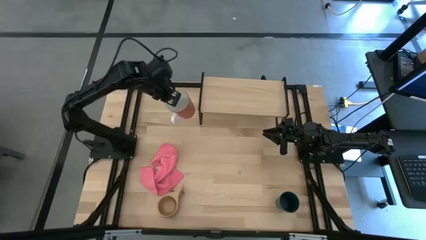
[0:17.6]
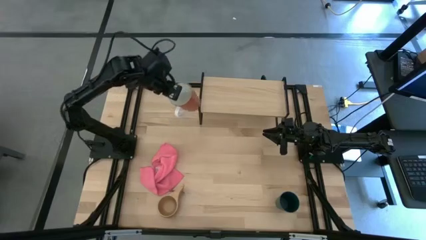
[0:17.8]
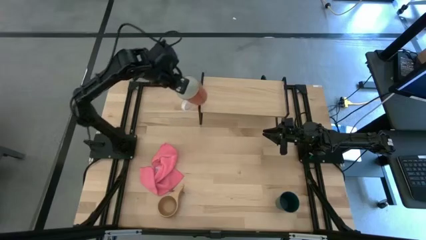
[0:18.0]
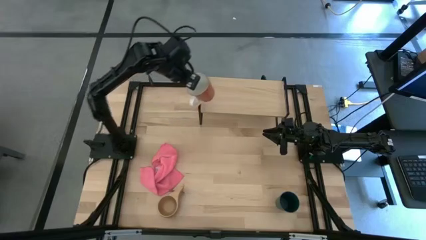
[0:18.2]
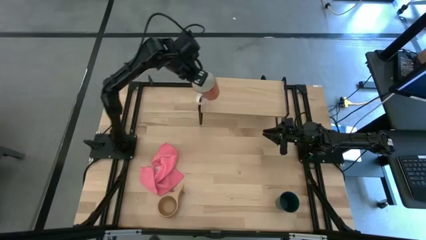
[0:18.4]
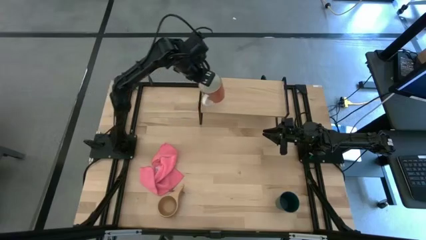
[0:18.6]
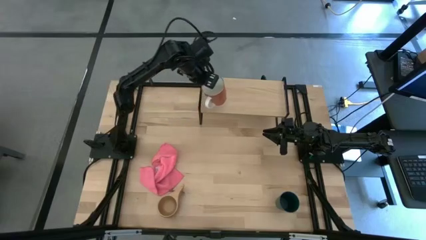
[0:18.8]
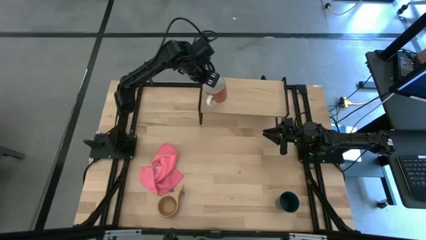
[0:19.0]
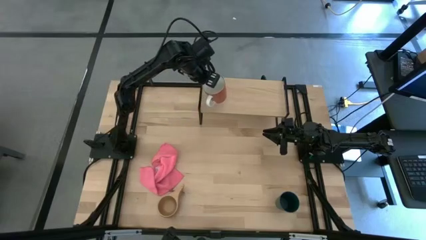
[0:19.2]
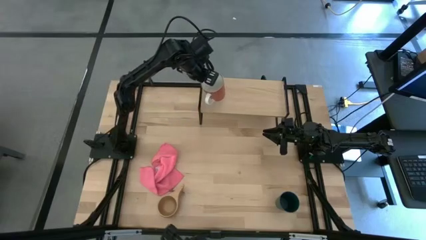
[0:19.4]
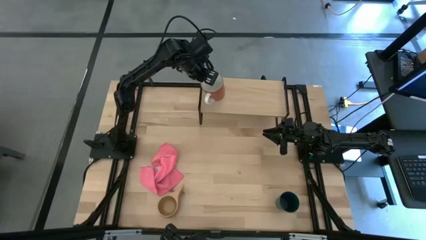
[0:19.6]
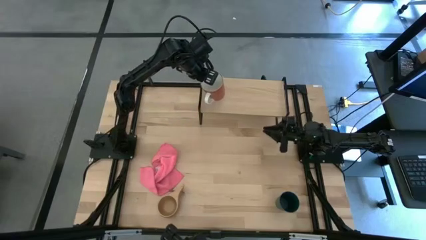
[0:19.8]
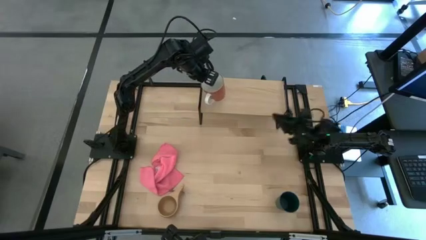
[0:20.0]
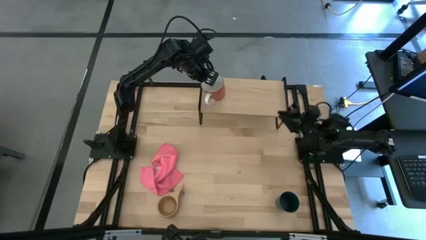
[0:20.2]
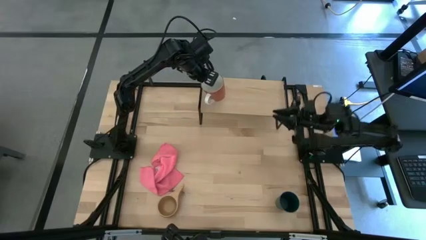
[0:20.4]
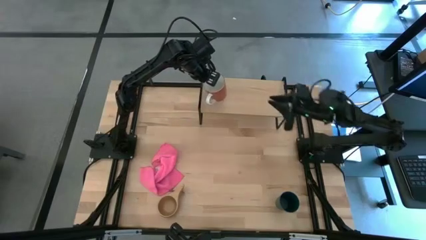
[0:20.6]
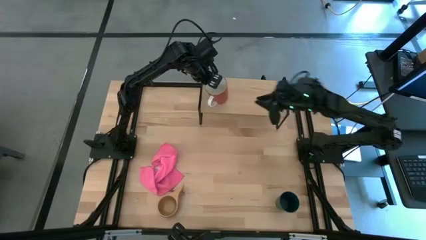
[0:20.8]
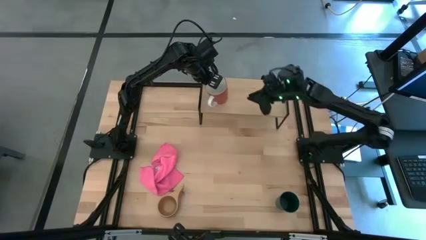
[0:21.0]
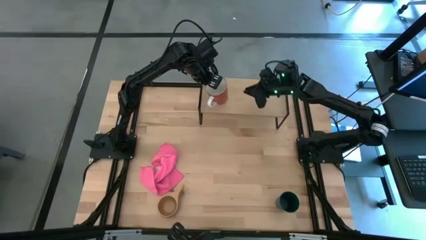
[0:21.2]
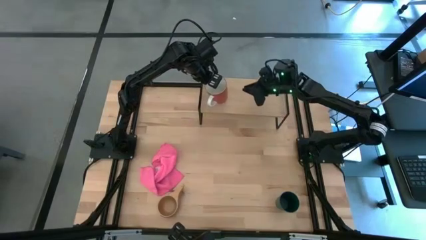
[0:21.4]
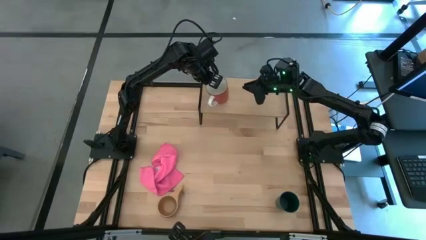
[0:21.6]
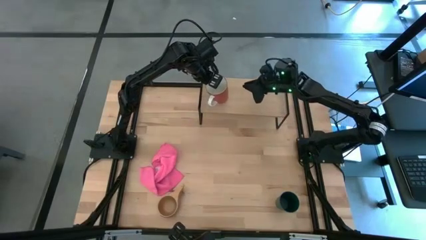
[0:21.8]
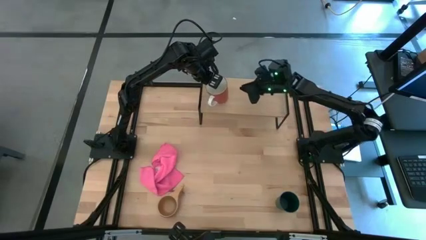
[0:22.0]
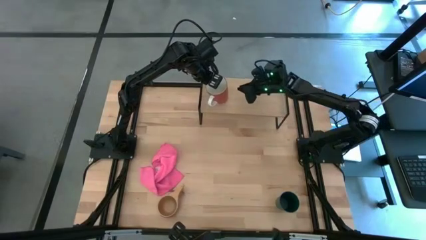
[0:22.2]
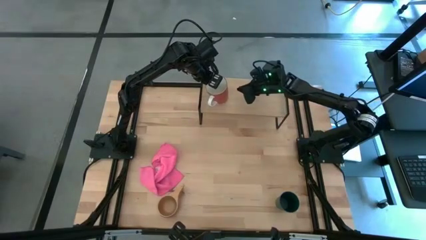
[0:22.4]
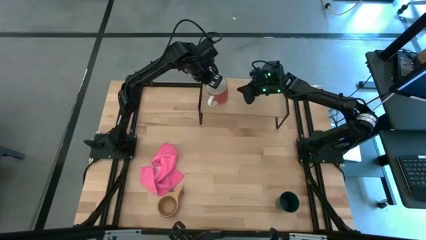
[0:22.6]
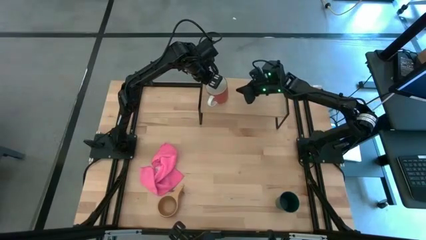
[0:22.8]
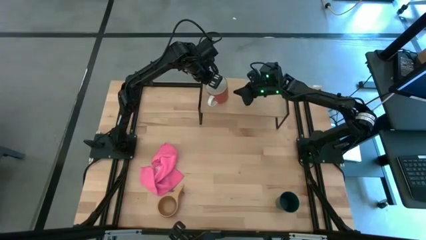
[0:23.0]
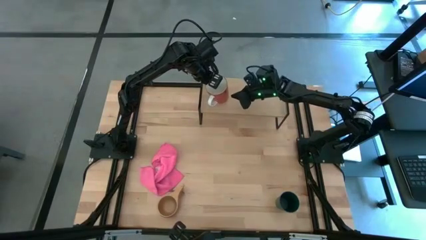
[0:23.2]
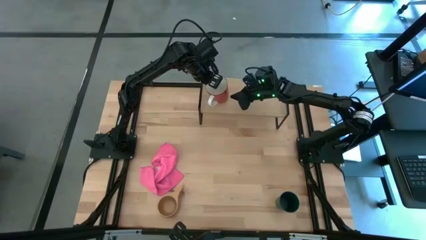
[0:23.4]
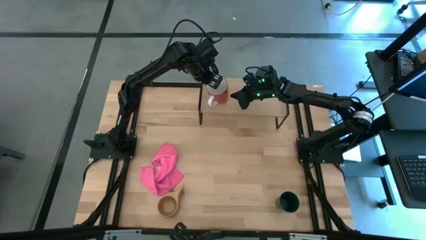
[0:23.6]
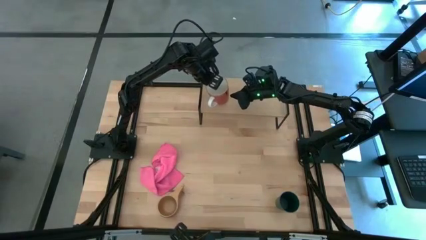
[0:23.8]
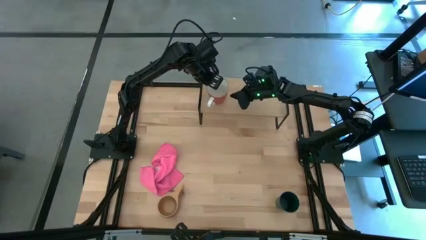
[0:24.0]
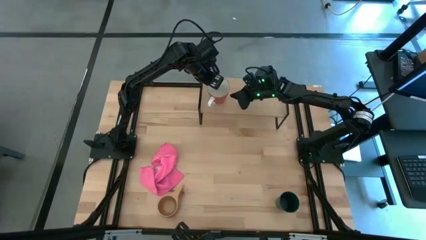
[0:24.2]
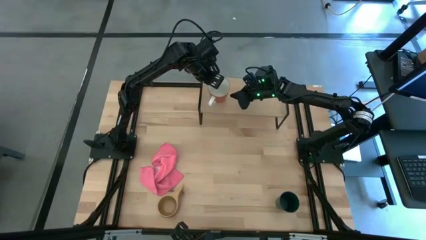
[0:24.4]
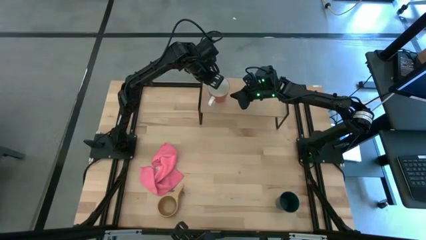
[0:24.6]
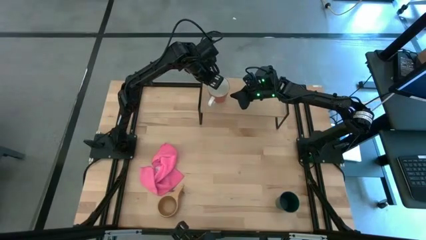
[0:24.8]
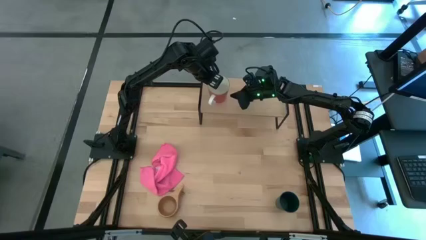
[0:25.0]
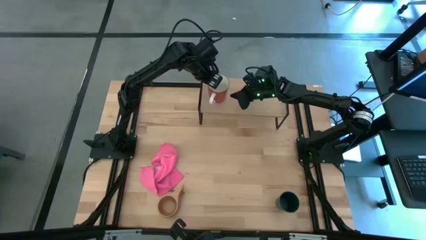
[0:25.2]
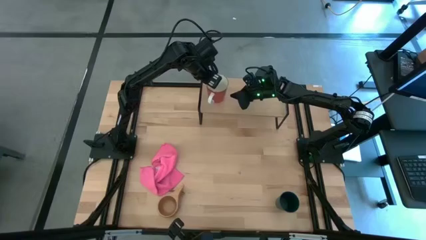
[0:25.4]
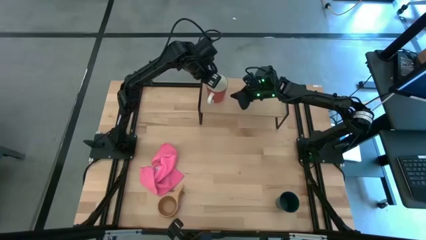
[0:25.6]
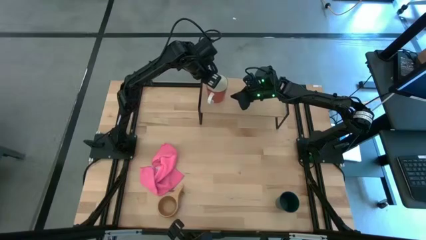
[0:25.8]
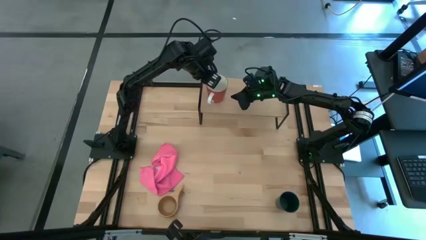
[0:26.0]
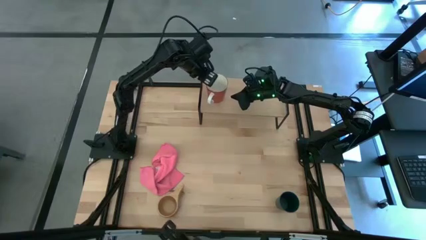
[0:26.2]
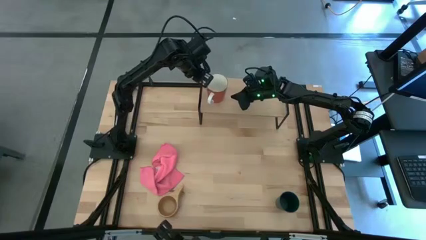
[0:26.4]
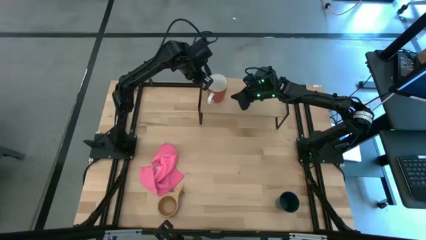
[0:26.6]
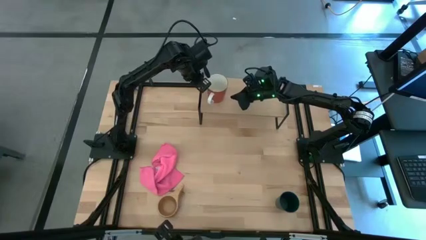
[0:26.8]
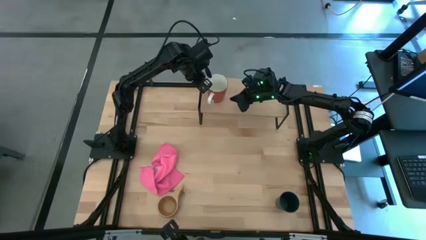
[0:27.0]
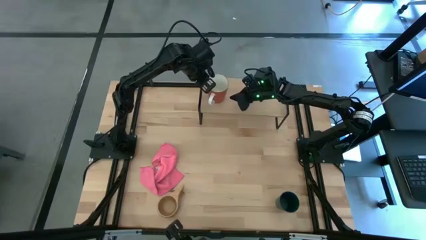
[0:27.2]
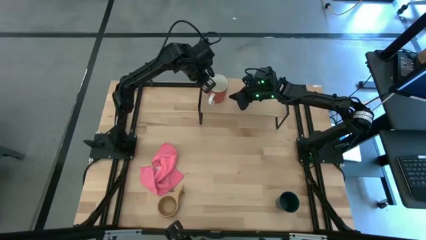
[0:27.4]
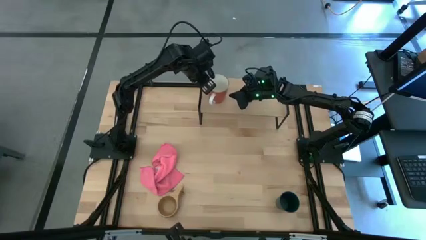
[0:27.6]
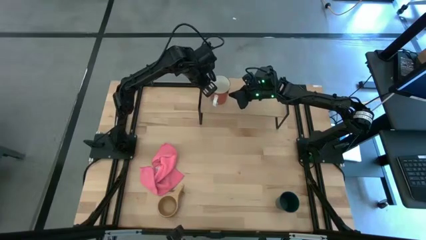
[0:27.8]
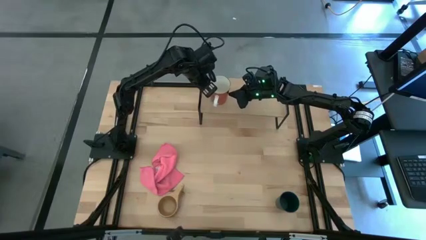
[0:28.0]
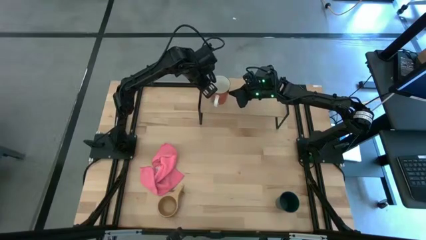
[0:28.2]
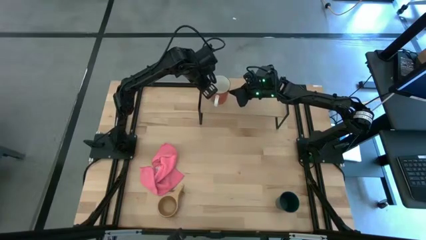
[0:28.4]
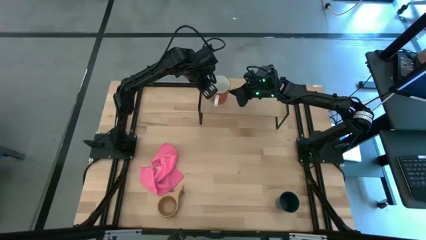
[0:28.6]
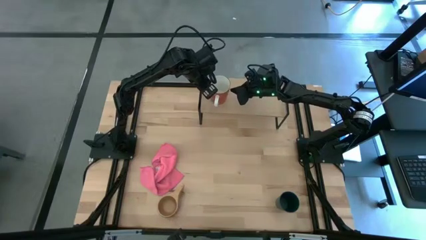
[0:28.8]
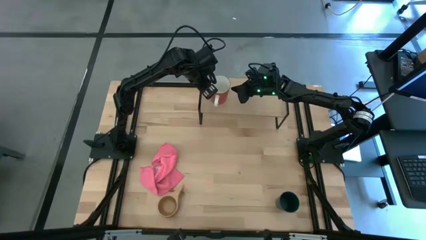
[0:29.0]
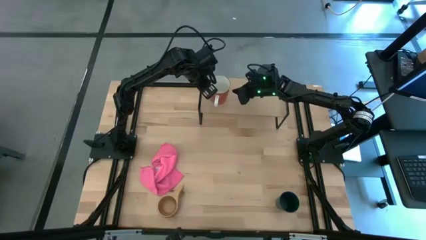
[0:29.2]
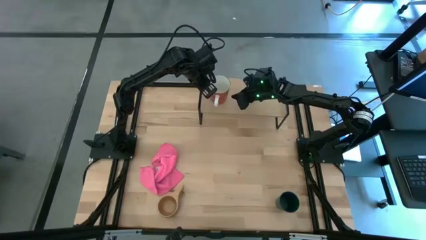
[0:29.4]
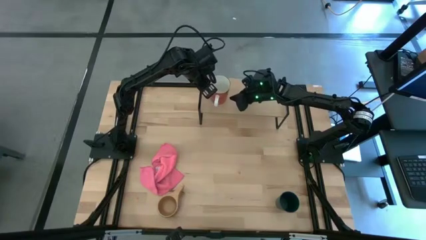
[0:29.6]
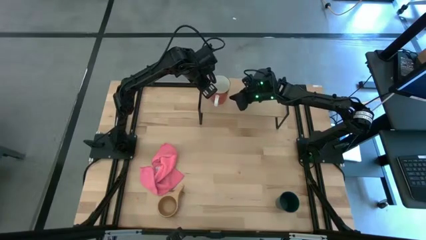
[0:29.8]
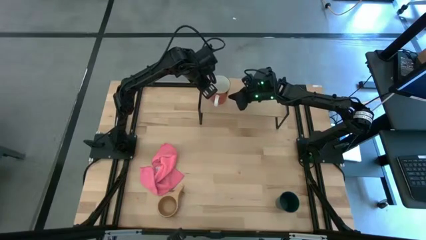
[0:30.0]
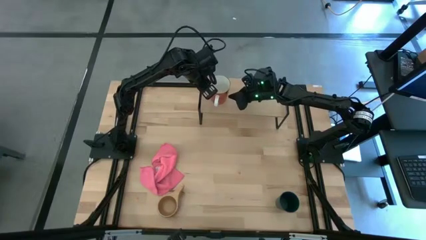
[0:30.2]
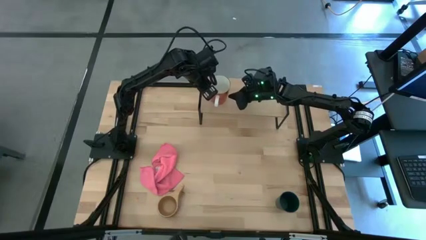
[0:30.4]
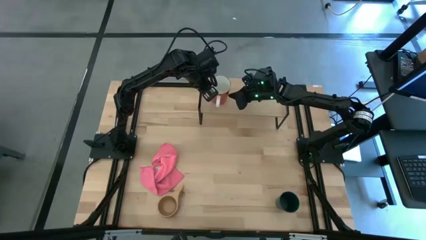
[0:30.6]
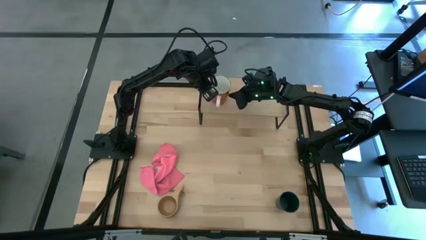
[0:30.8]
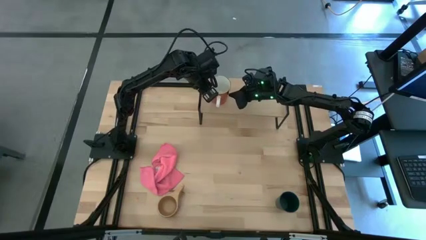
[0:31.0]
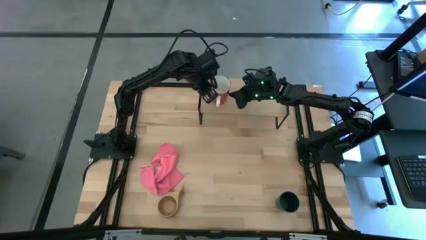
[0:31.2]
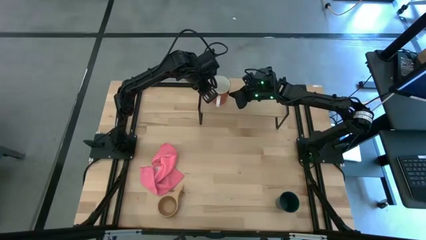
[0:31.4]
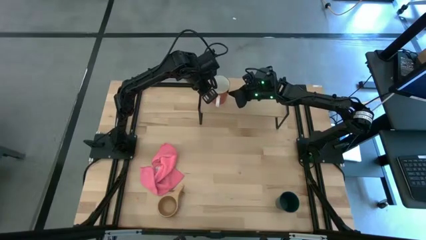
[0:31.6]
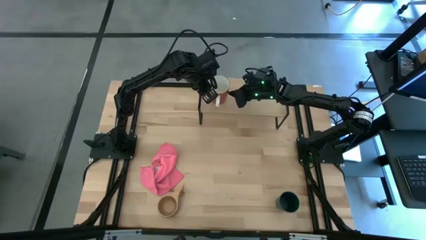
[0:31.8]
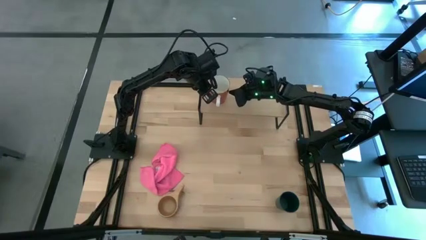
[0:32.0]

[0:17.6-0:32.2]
Task: Stack small to large cups/mugs on shelf
Put the orange mug on the shelf
